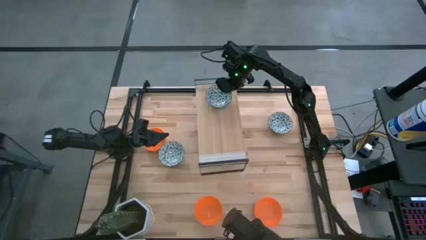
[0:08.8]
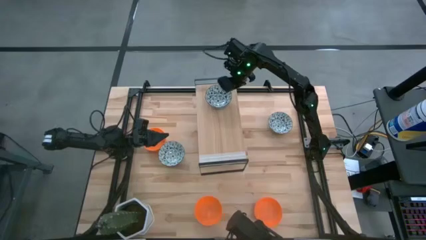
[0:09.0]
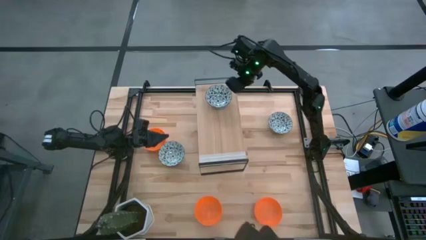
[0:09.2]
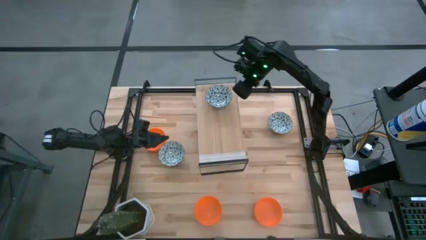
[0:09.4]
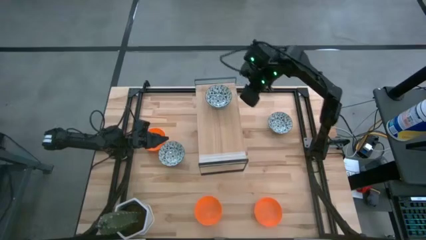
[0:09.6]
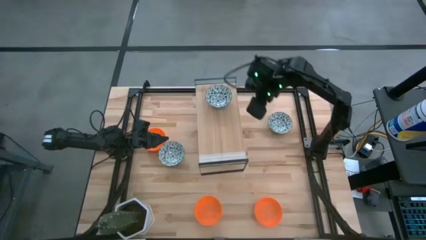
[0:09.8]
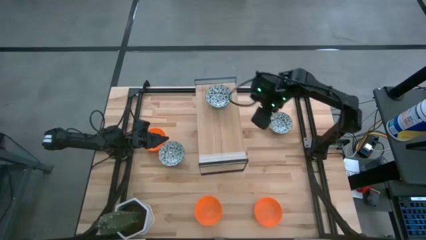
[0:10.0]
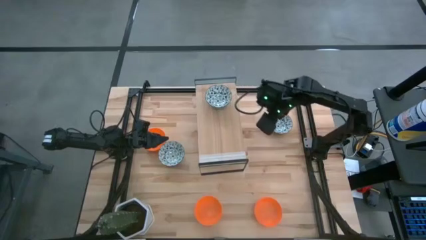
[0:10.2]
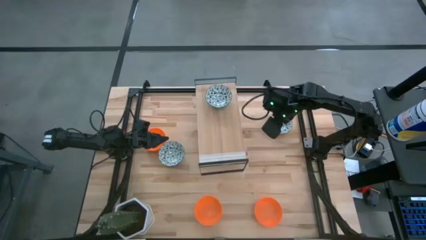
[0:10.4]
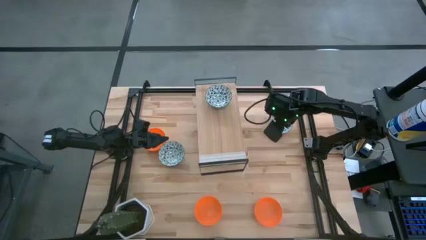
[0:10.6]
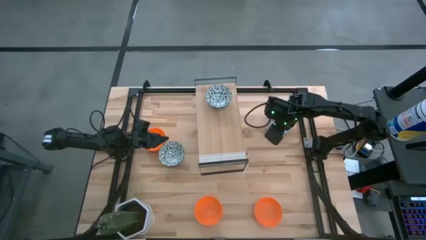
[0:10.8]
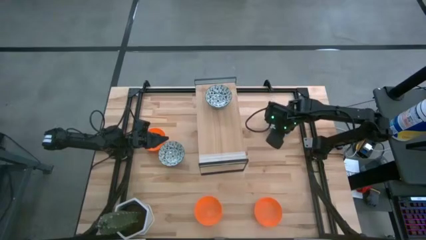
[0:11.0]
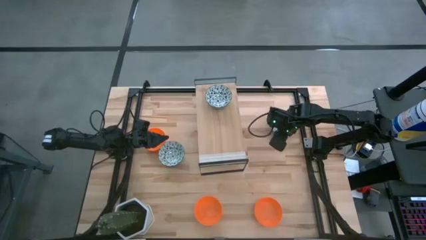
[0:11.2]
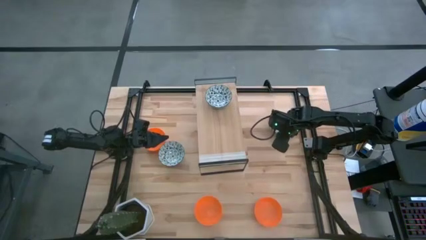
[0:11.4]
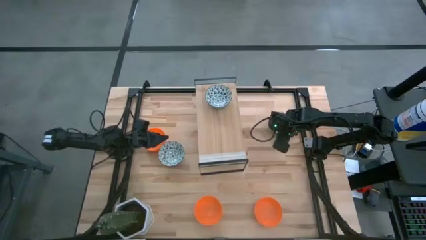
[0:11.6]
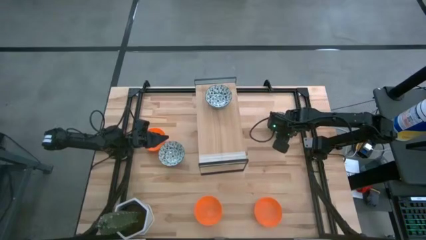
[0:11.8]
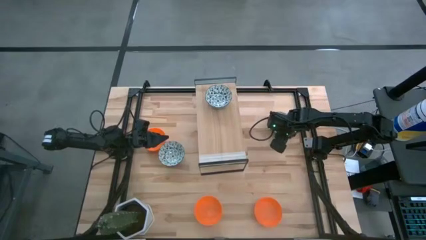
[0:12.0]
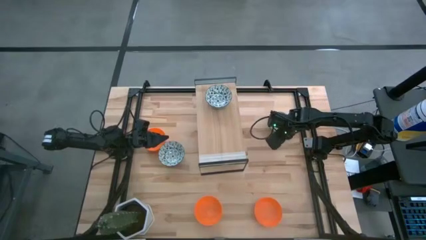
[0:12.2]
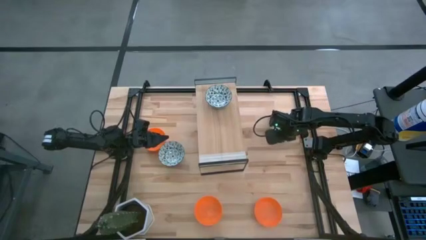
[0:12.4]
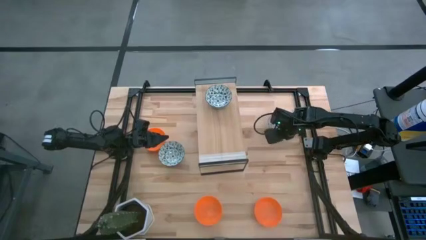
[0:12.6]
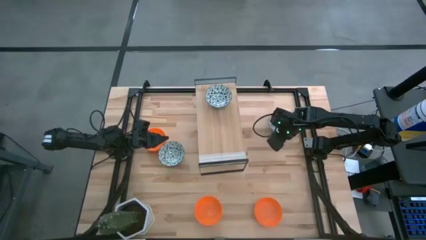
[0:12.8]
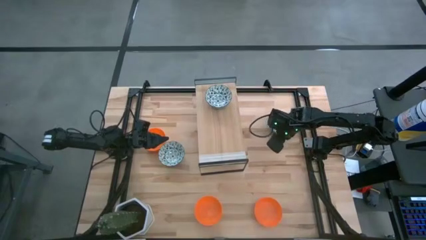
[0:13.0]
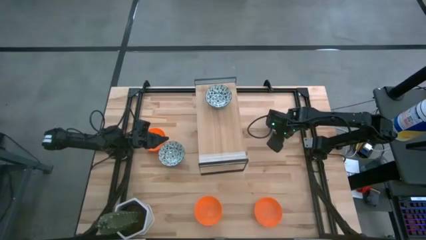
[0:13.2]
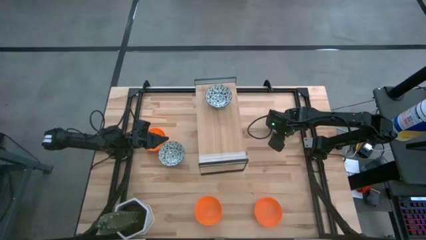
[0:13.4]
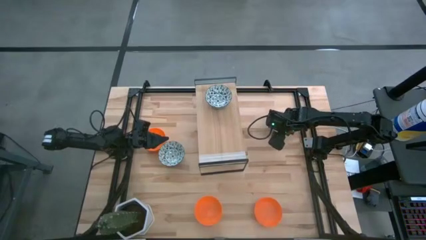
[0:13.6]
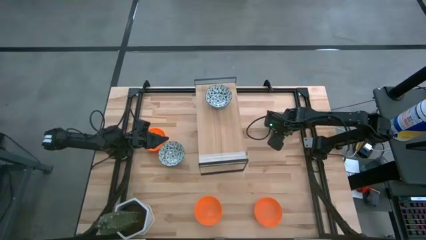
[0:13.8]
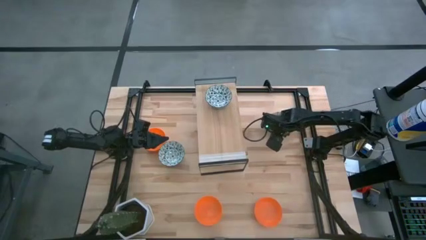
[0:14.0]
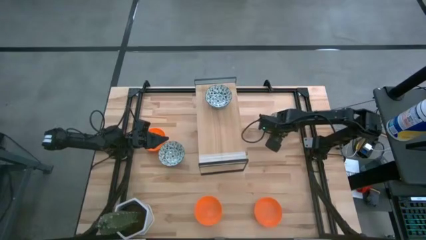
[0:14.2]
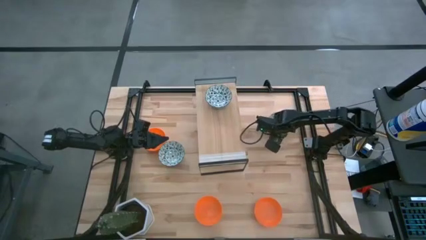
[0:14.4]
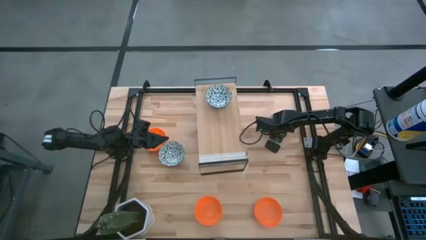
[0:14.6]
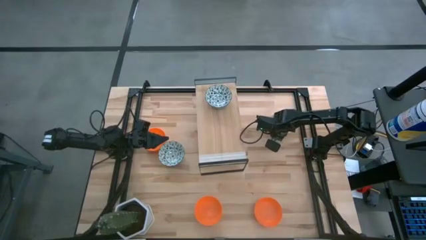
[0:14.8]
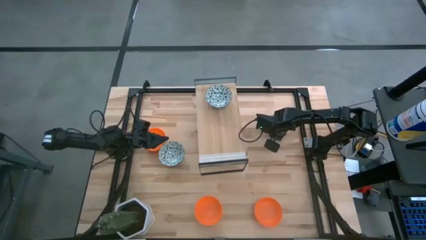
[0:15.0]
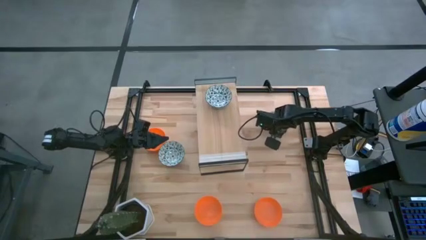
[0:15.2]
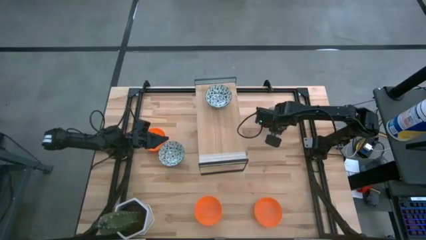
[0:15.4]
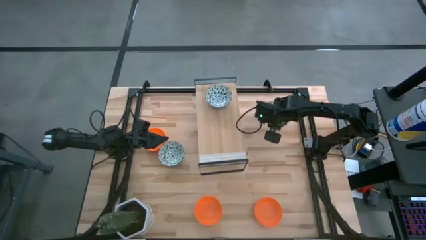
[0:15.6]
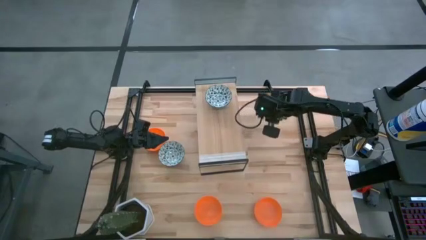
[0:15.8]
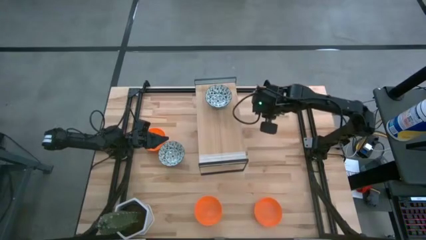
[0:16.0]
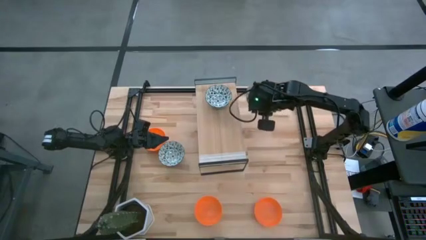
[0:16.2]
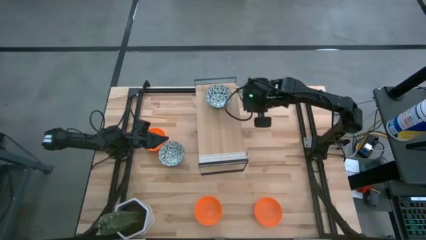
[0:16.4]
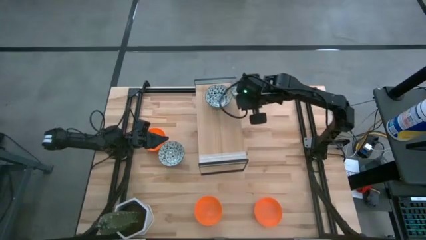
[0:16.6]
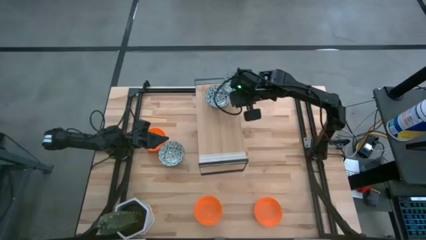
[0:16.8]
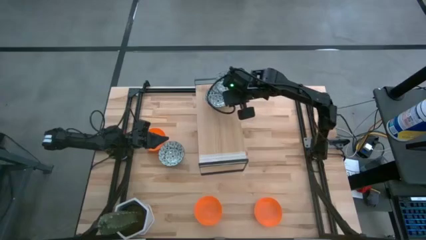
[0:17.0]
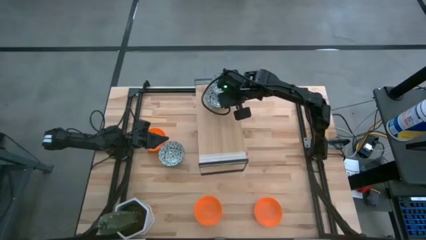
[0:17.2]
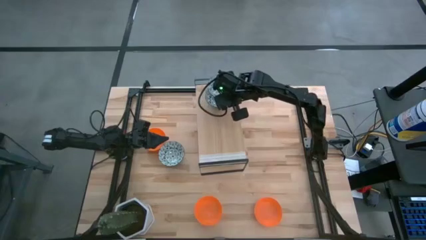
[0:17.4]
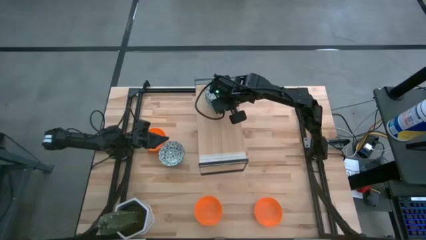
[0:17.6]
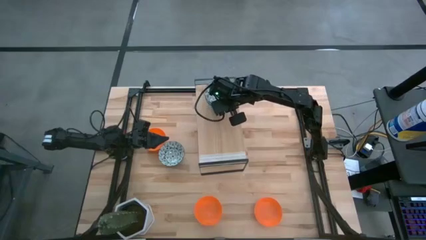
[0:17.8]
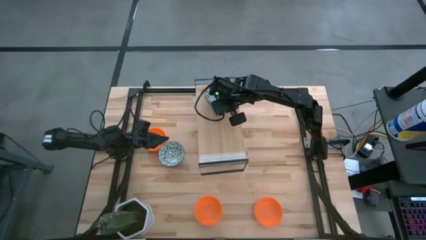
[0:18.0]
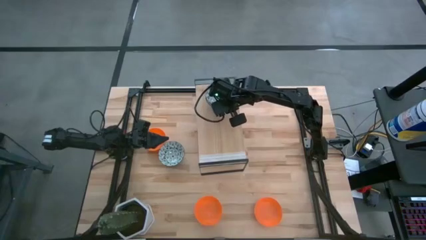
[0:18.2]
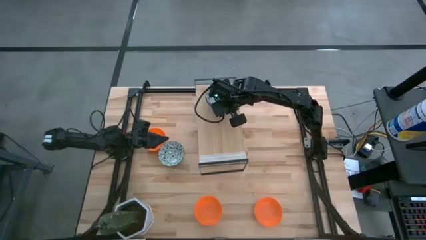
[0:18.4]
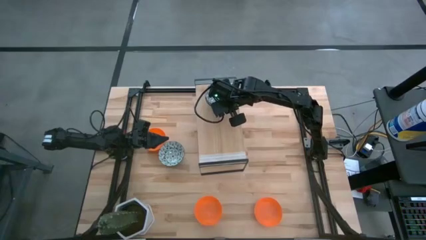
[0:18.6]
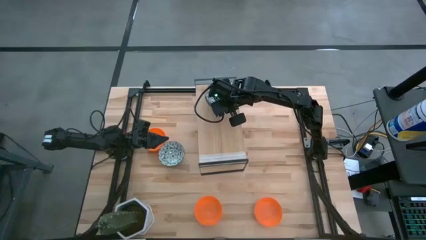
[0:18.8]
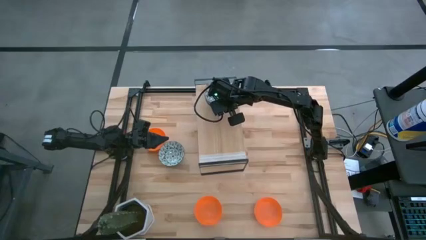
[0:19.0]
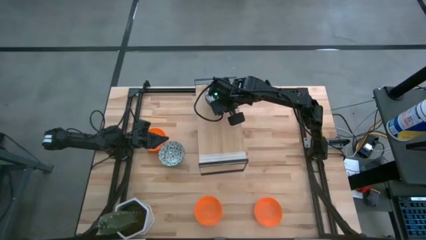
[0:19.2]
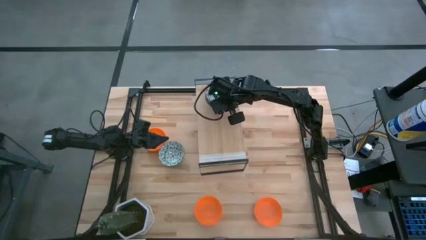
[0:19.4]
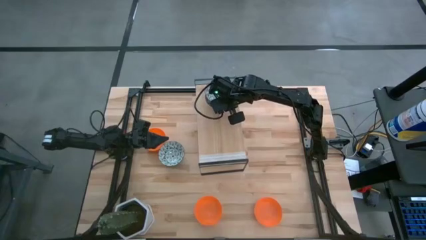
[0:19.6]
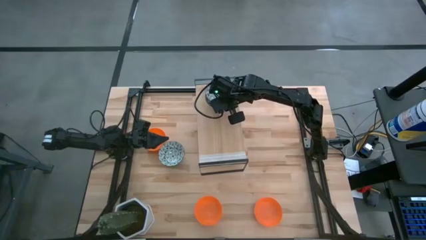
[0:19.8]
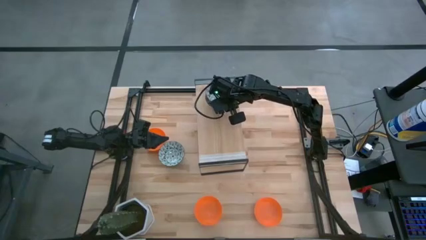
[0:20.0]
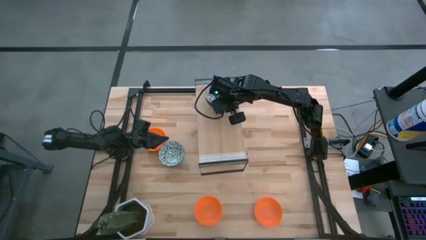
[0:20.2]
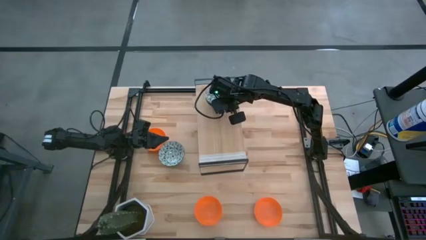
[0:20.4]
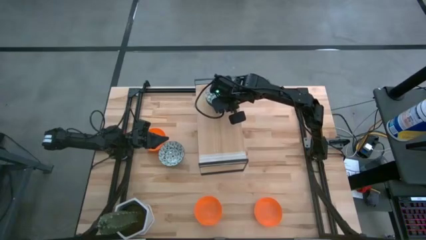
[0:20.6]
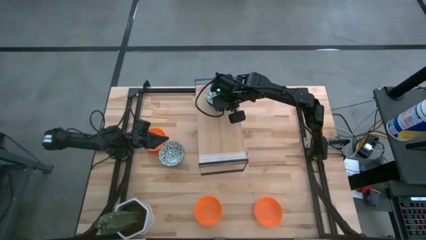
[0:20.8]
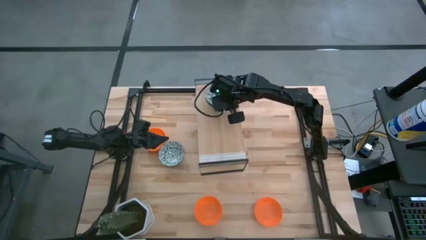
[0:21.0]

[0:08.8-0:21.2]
Task: Pick & Place Mini bowls
Stack the right blue bowl on top of the blue bowl on the shelf
